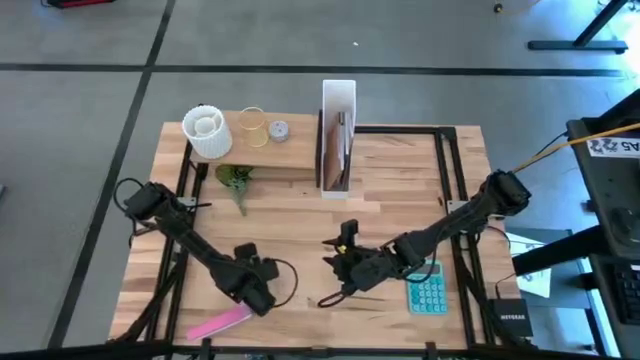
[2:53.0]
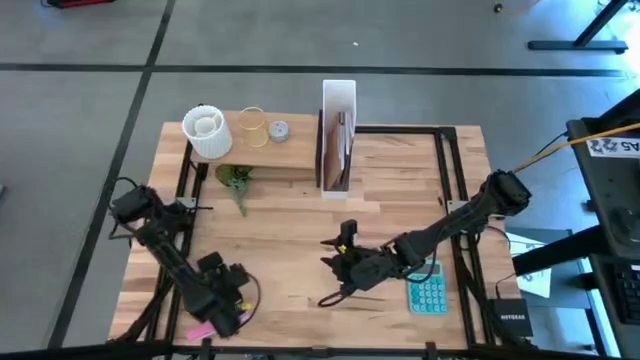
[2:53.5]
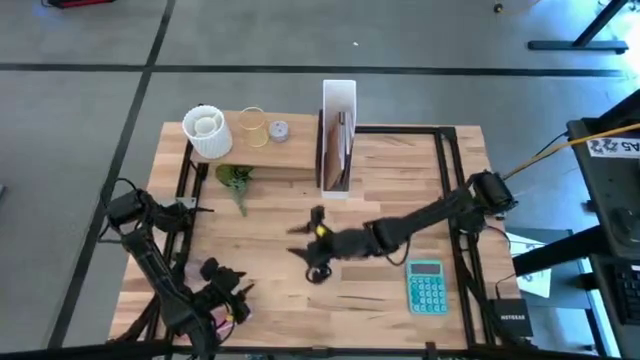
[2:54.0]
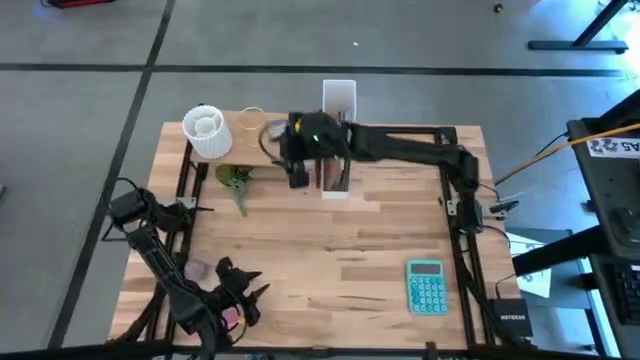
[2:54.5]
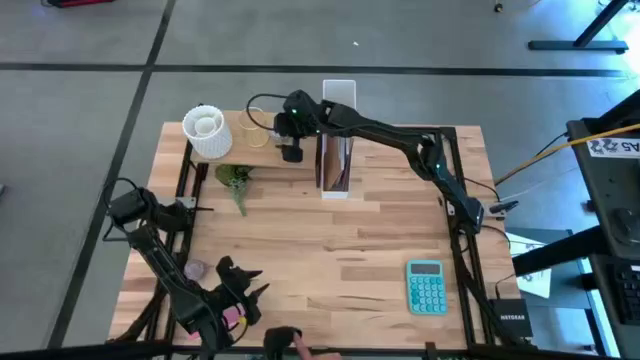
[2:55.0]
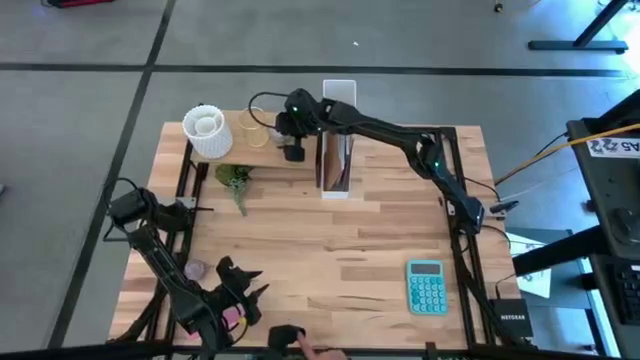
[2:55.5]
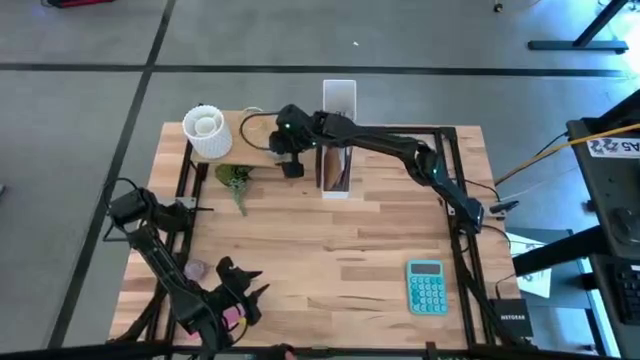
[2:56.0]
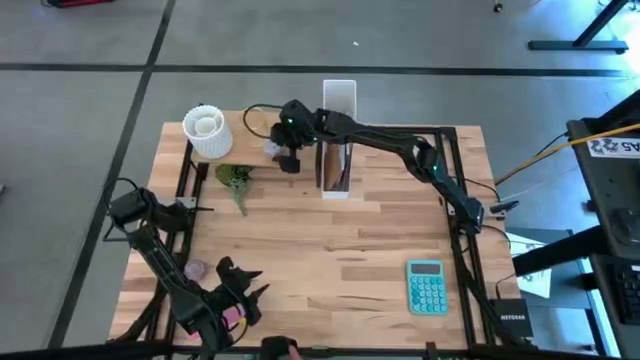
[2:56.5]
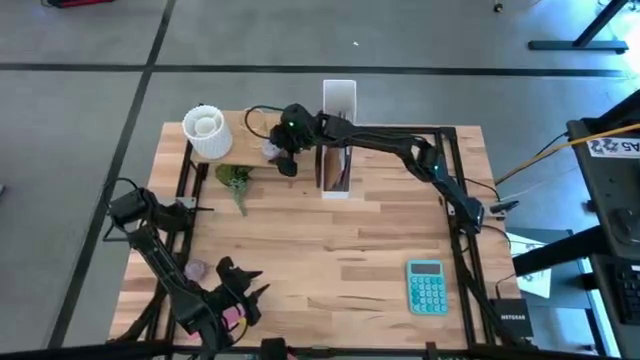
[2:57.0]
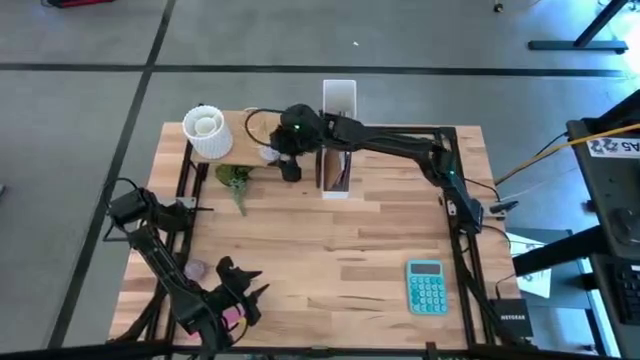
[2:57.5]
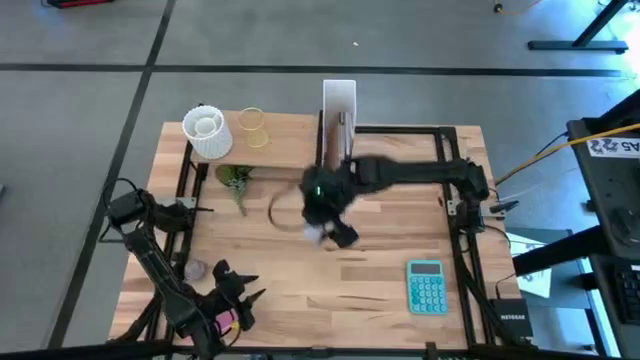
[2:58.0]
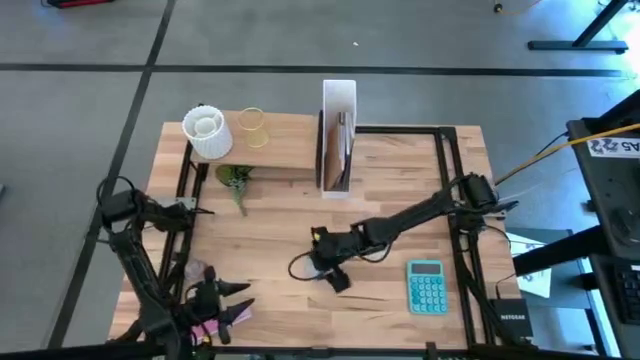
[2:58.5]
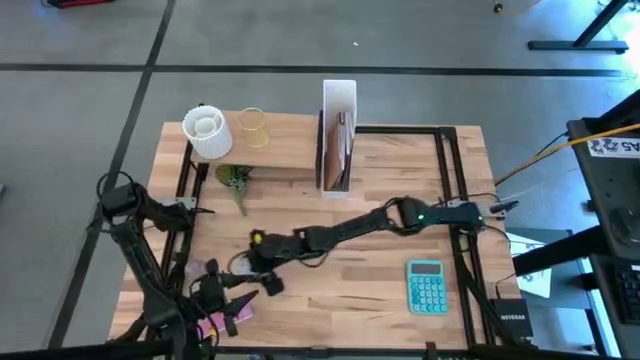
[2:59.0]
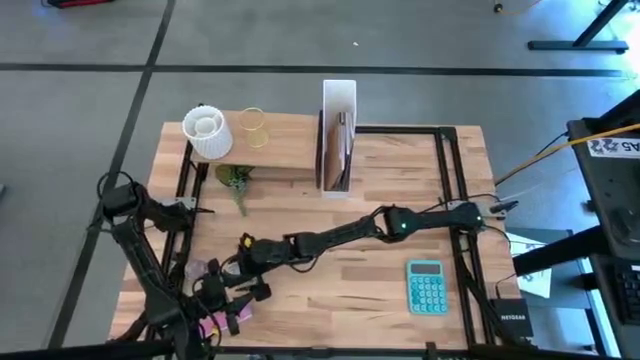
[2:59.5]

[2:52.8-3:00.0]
Task: Stock shelves
Remove the white pattern candle scented from the shelf

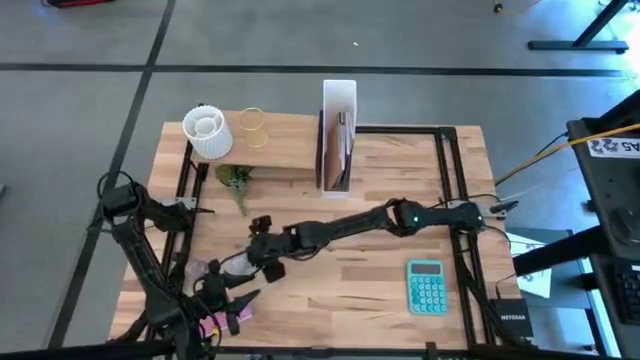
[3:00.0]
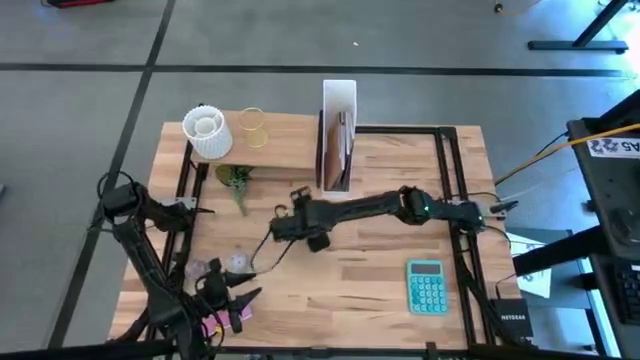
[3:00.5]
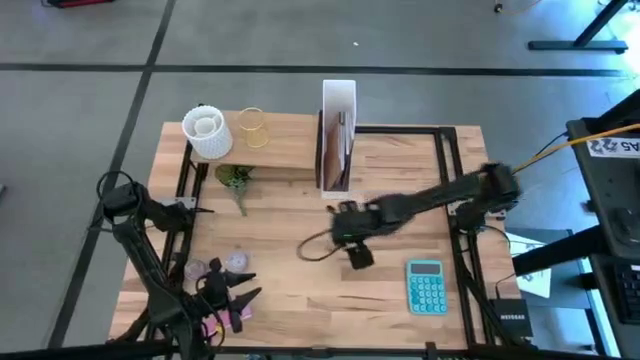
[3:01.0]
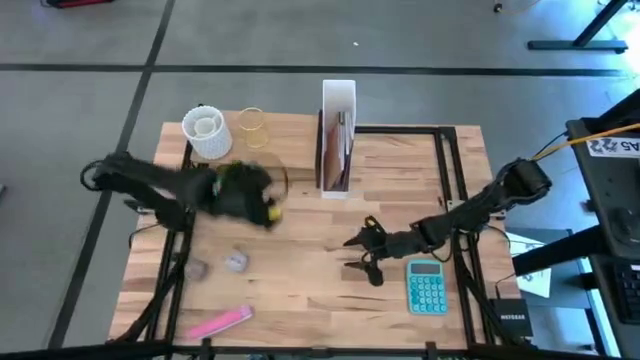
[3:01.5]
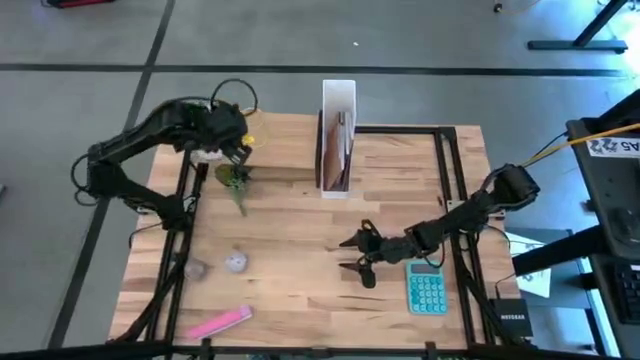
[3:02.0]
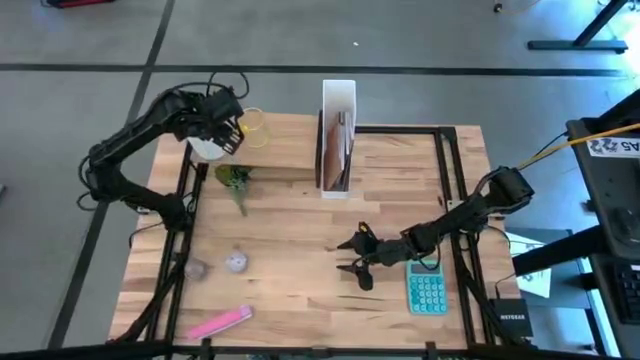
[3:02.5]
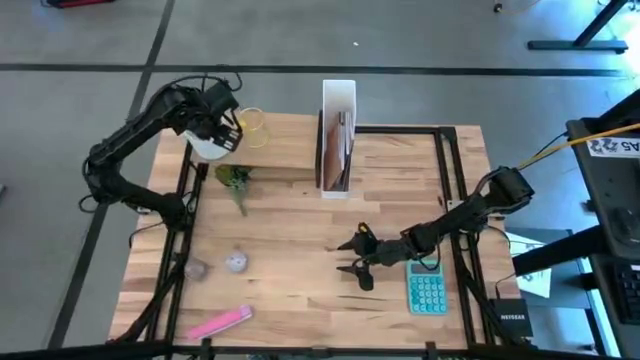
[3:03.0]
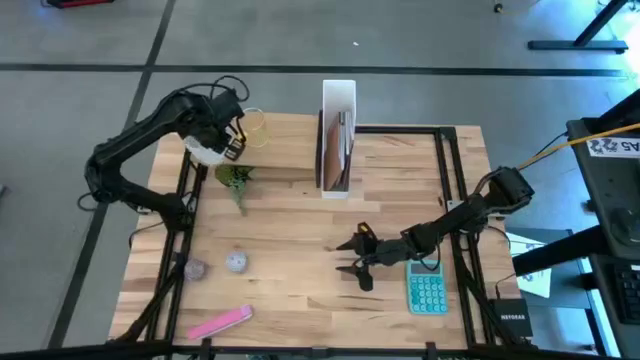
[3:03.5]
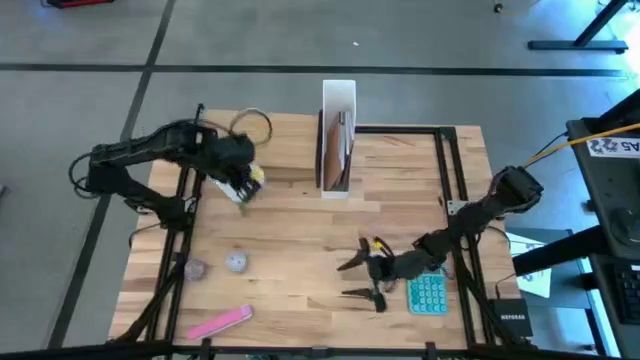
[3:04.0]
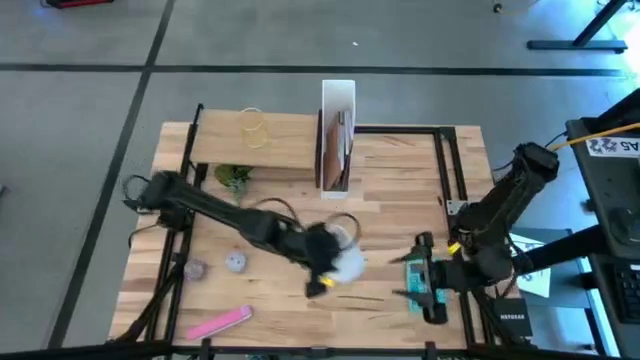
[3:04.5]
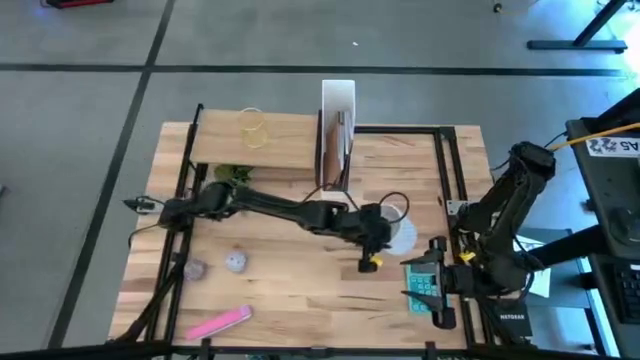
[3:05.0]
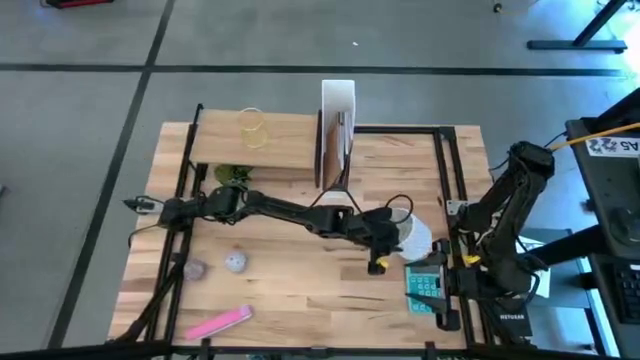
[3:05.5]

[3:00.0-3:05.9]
Remove the white pen organizer from the shelf

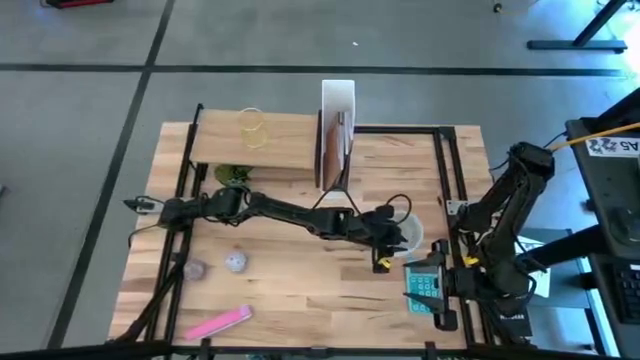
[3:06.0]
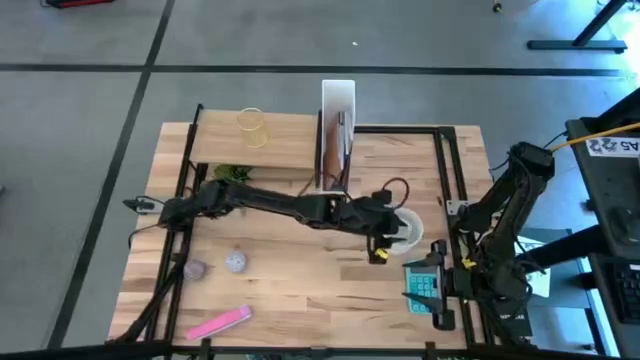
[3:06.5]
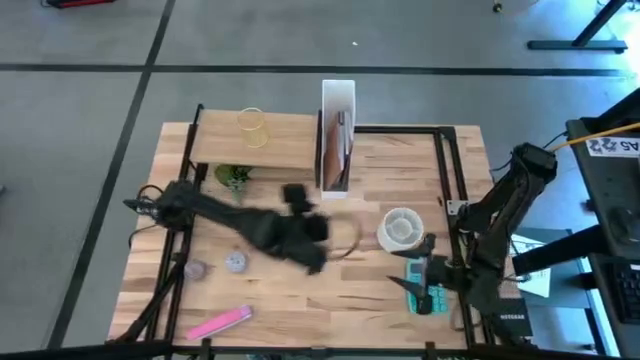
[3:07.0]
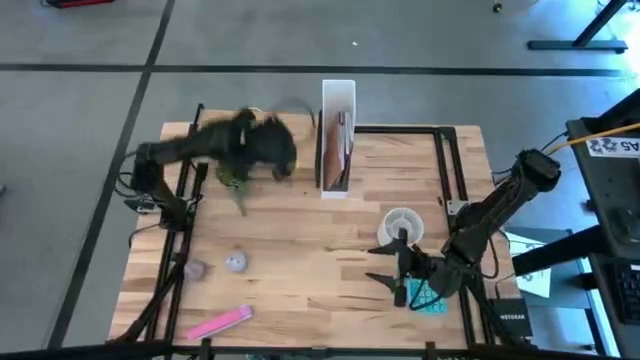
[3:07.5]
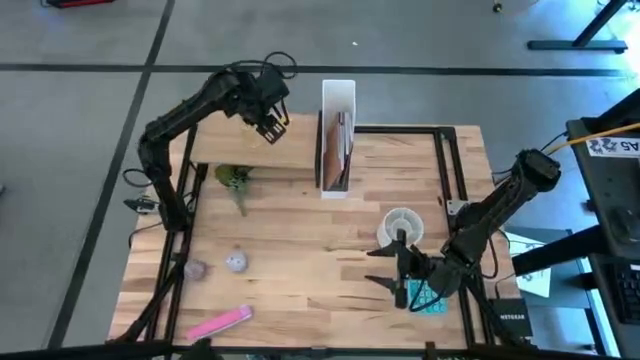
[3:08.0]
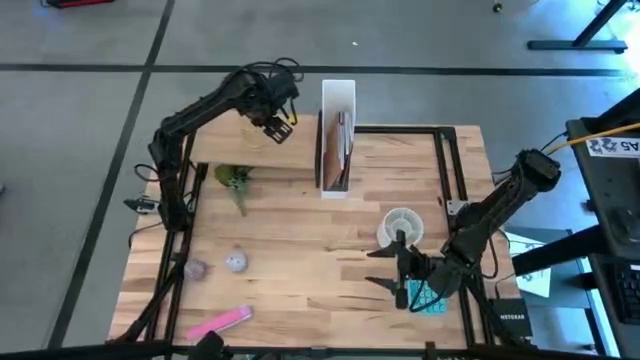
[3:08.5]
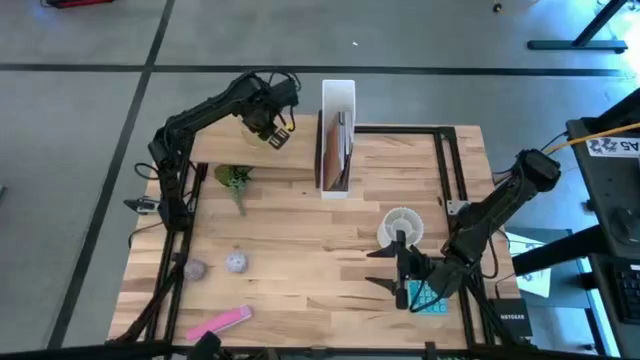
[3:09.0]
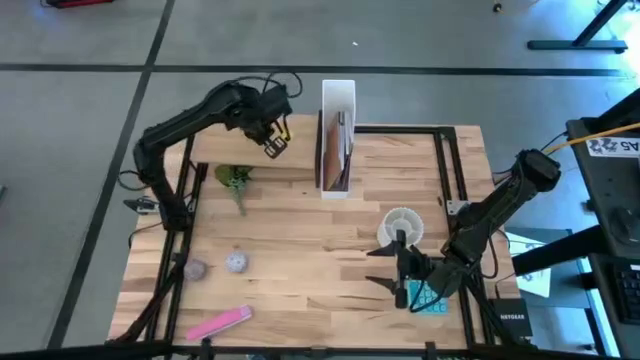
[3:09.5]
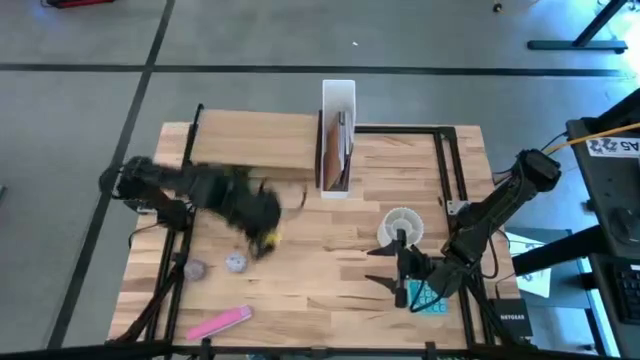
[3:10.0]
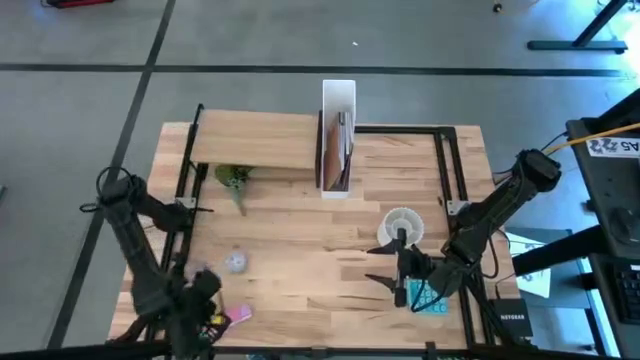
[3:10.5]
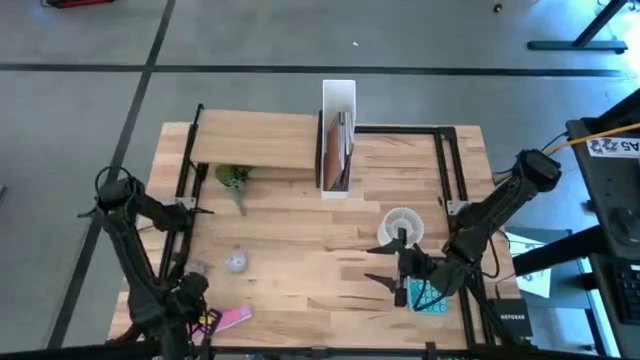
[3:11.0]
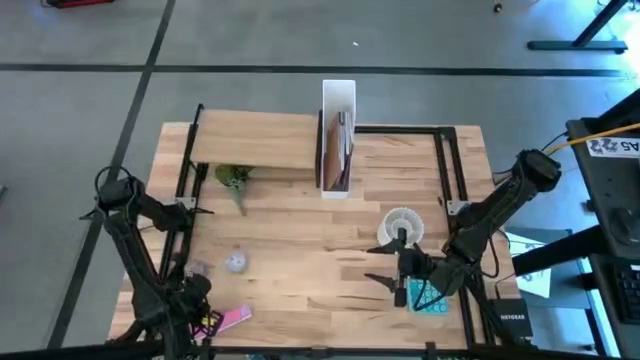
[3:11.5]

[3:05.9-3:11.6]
Remove the yellow pen organizer from the shelf

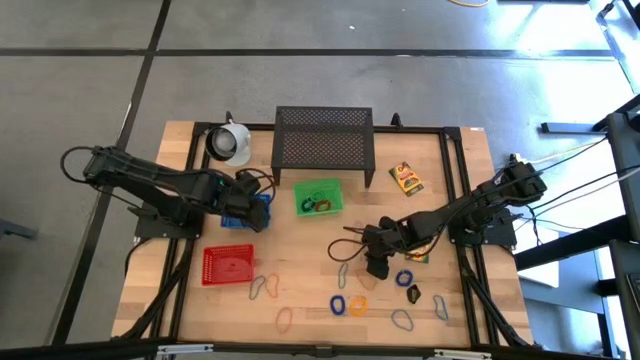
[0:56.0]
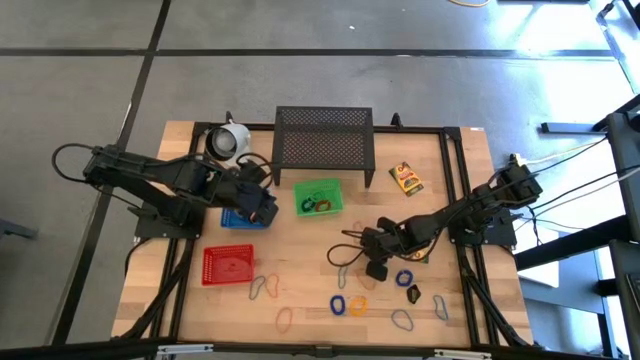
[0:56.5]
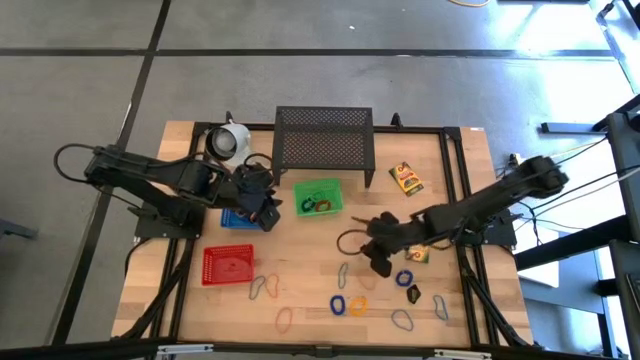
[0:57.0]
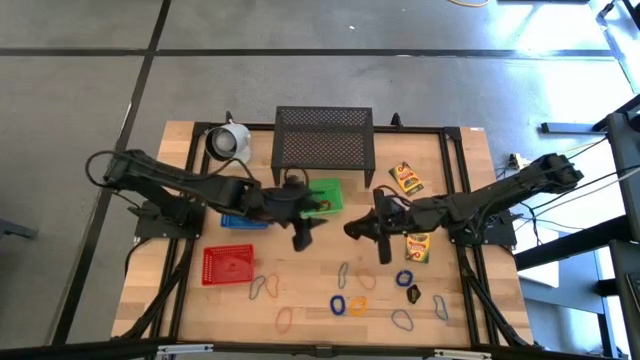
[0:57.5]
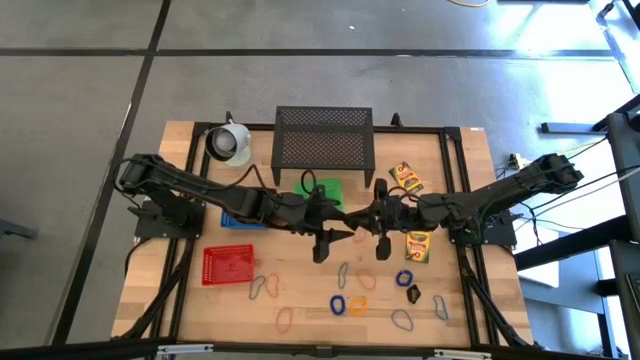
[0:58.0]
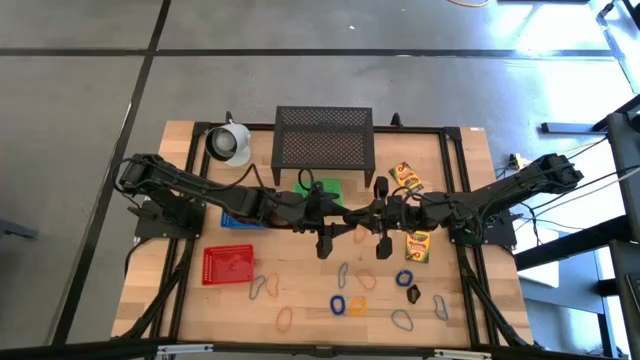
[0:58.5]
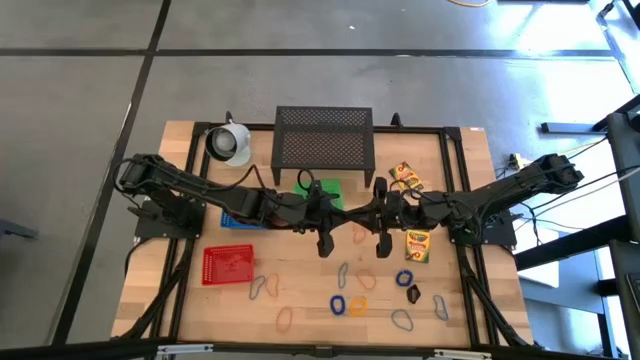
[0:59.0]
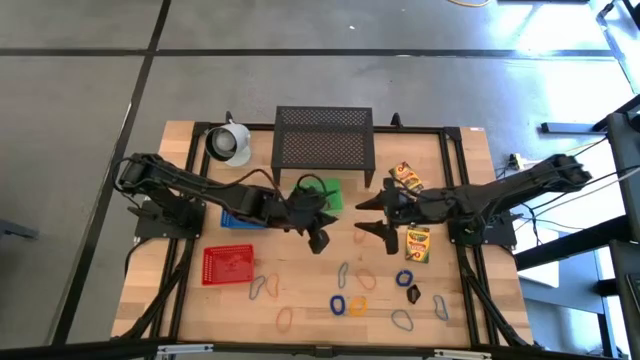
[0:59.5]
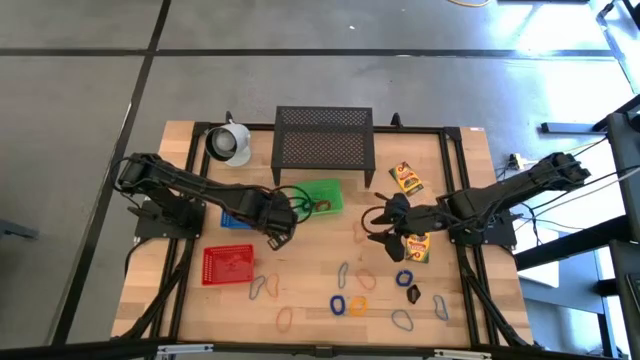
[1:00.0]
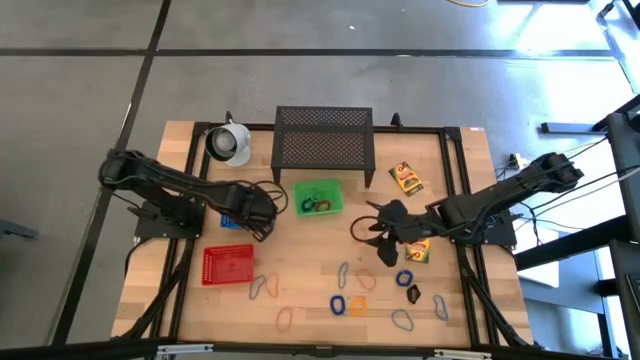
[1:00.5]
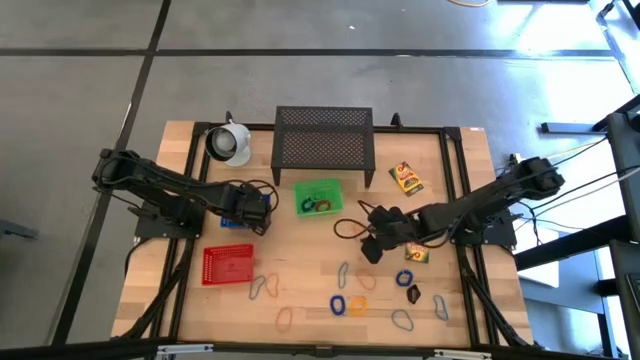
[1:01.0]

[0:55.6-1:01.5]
Task: Pick & Place Office Desk Supplies
Put the black rubber band into the blue bin
